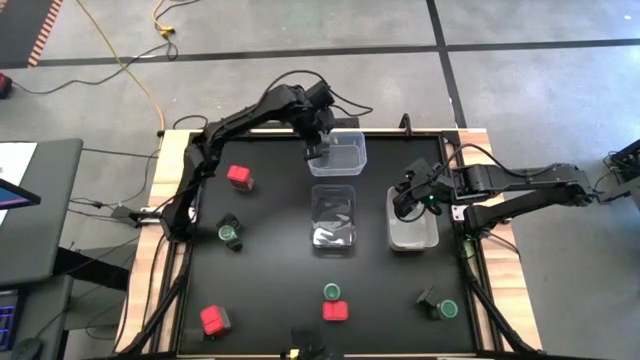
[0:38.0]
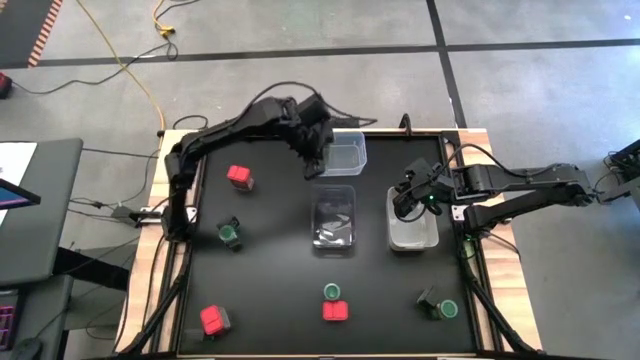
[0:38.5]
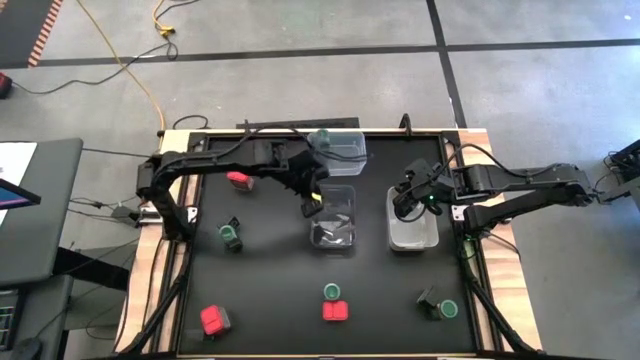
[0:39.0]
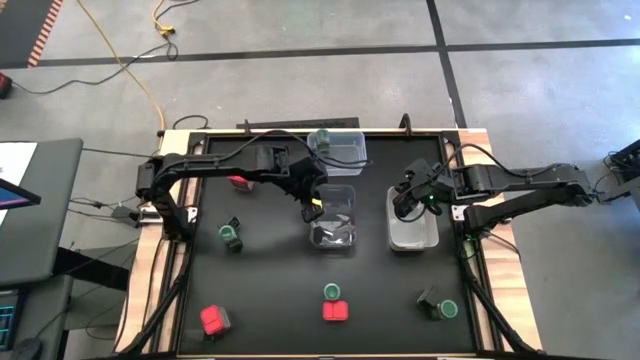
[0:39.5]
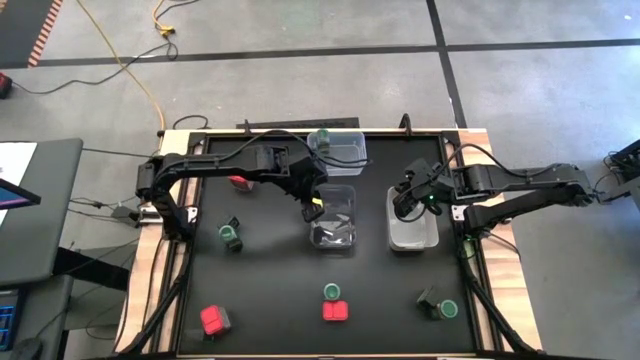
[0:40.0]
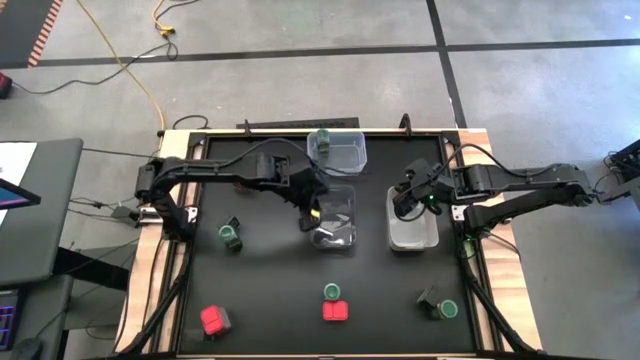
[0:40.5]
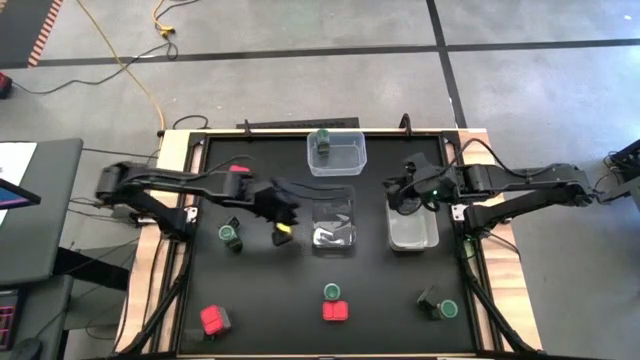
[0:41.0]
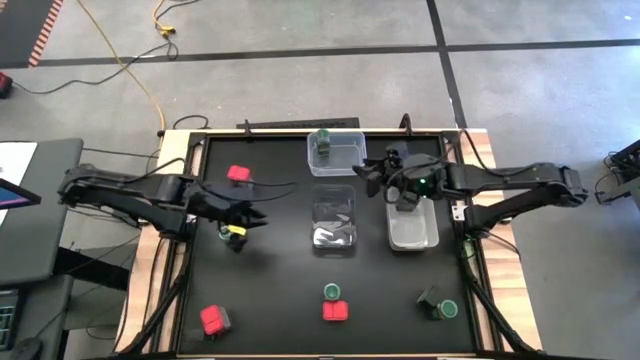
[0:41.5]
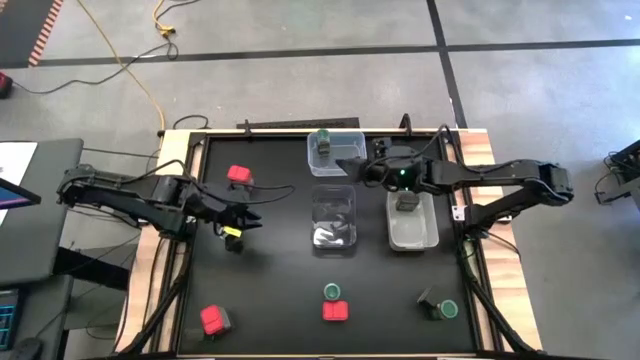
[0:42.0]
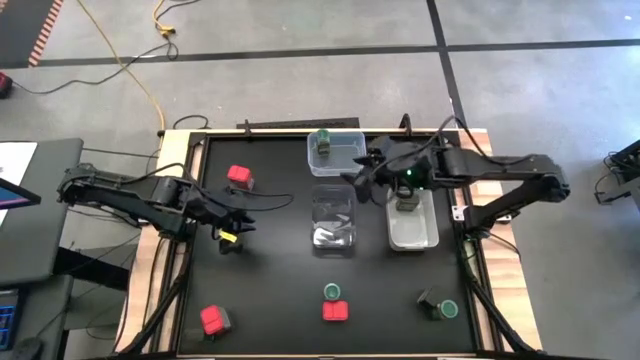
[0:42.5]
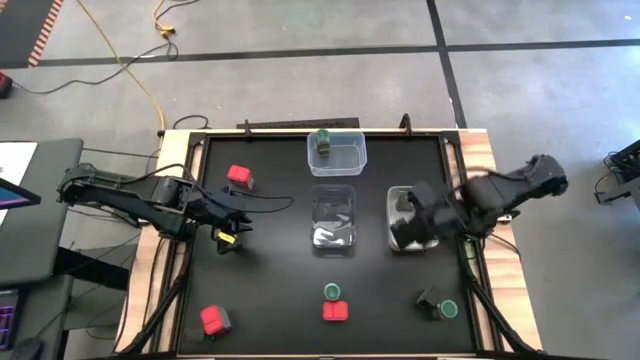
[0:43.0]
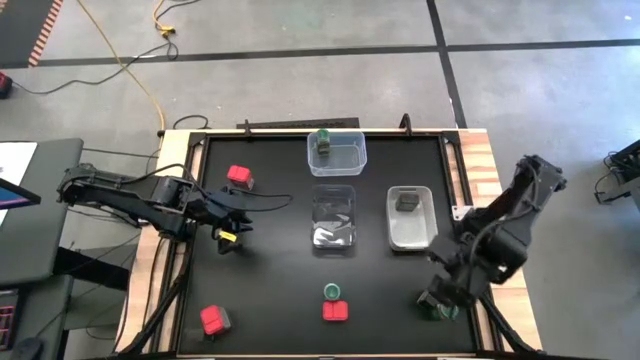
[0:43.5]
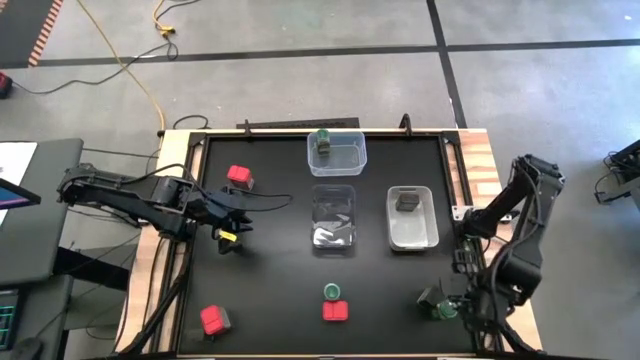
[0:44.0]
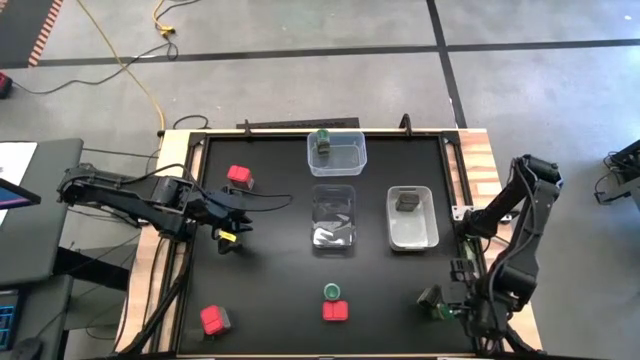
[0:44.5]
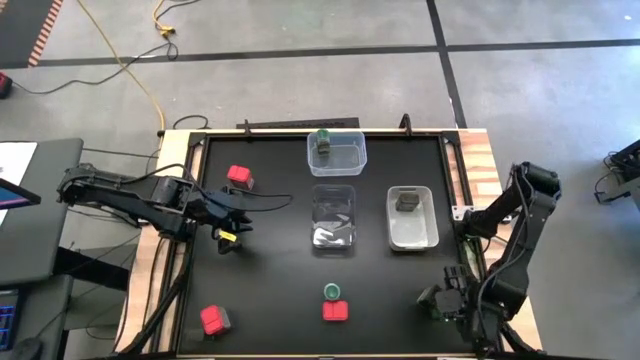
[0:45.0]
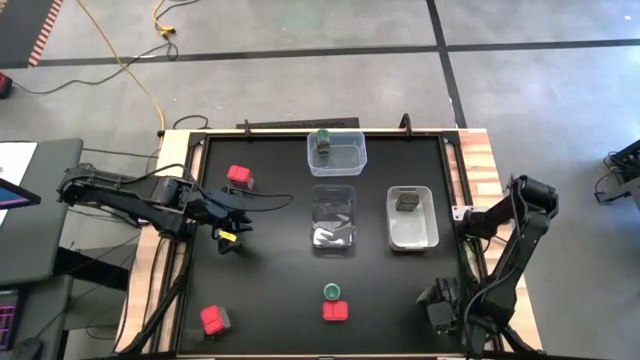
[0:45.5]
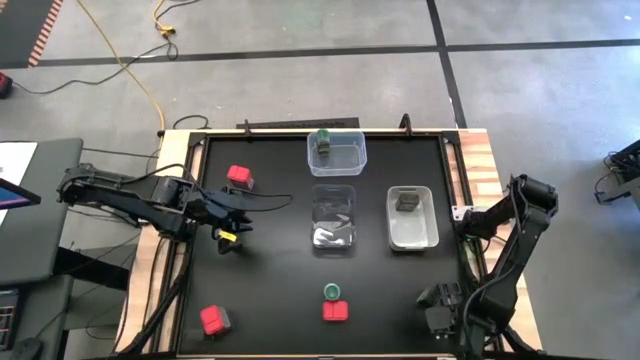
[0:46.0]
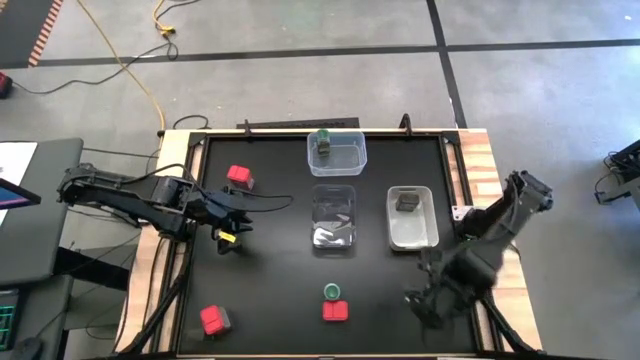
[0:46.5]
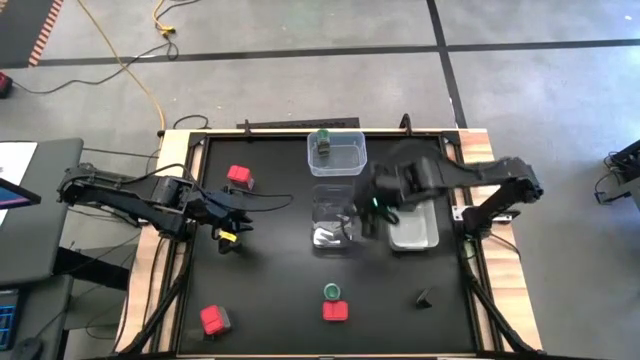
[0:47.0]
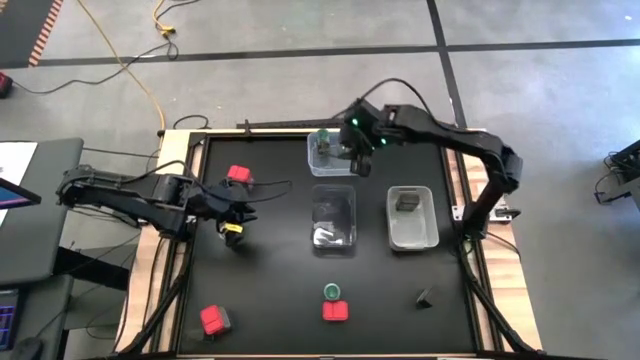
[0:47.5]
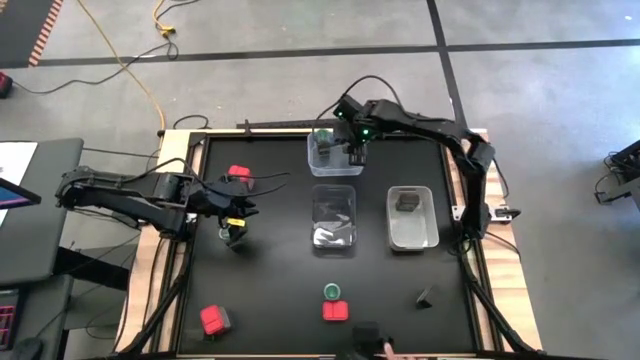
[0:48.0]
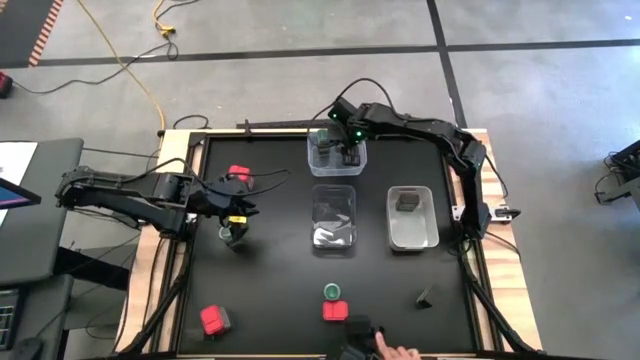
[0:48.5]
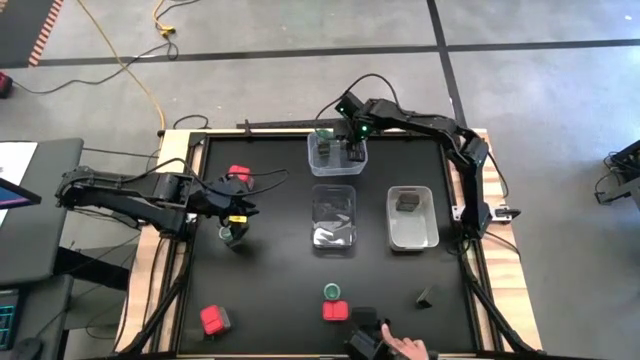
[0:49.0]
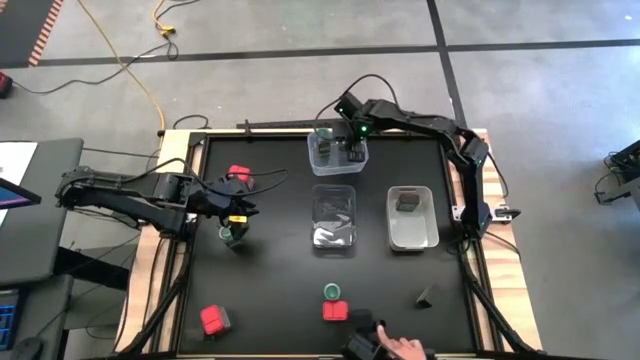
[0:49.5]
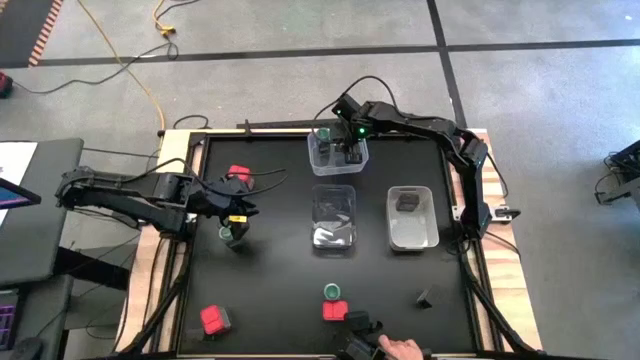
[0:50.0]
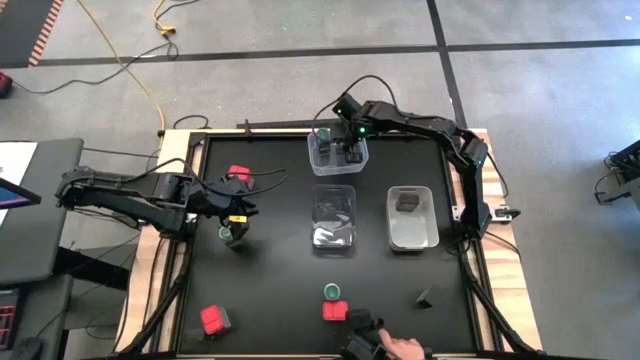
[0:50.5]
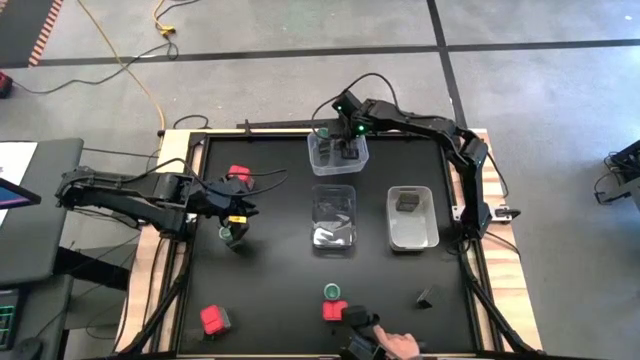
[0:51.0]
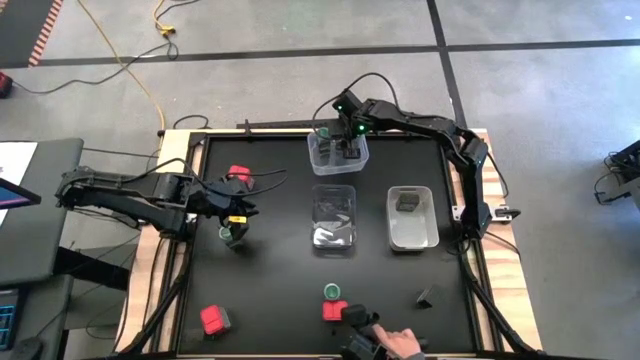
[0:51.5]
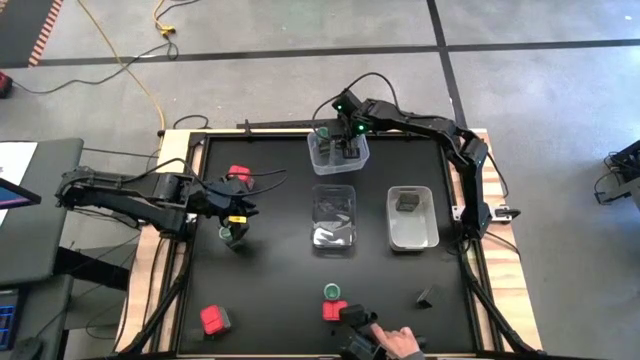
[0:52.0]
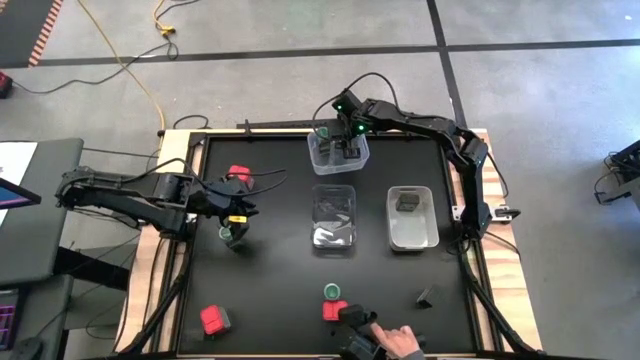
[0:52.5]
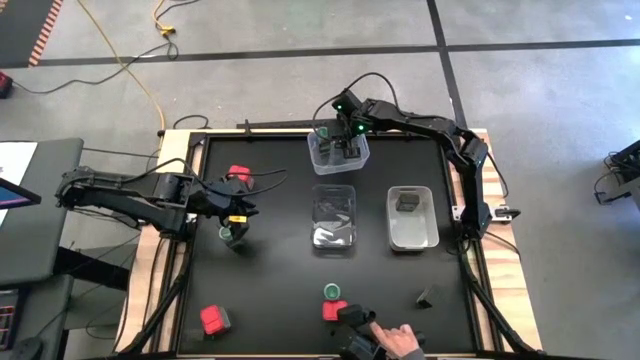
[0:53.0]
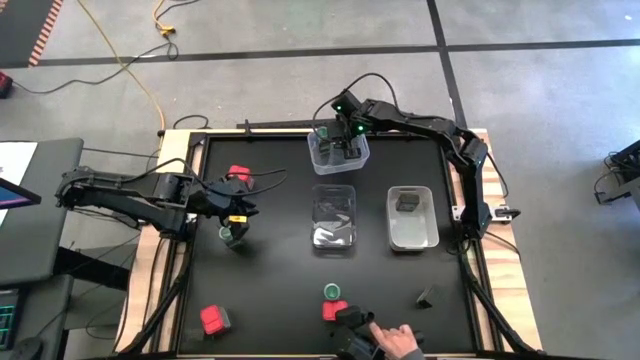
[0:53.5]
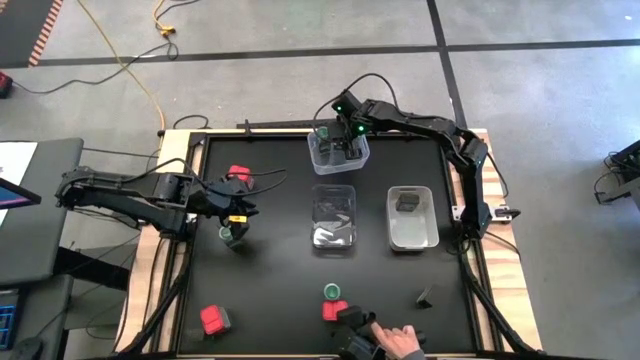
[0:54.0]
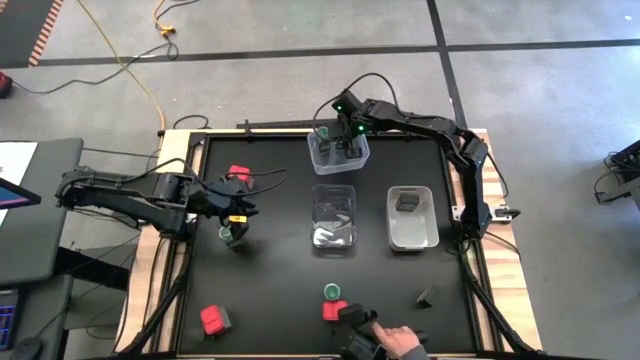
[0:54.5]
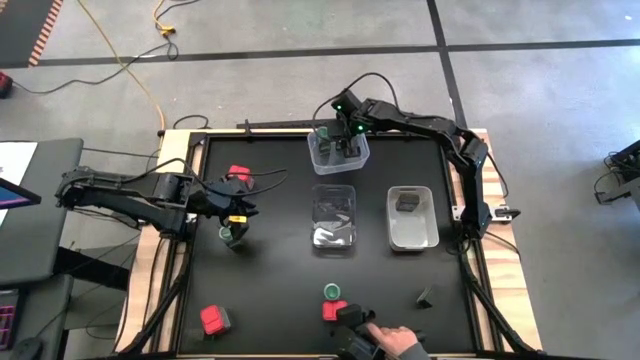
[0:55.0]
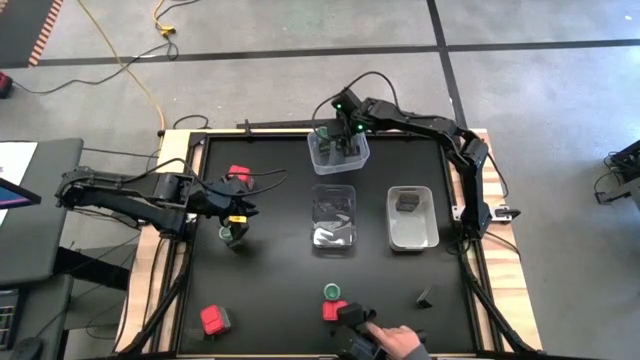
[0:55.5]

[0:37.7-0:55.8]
Task: Sort spices by type
Put the green seasoning bottle into the transparent bin

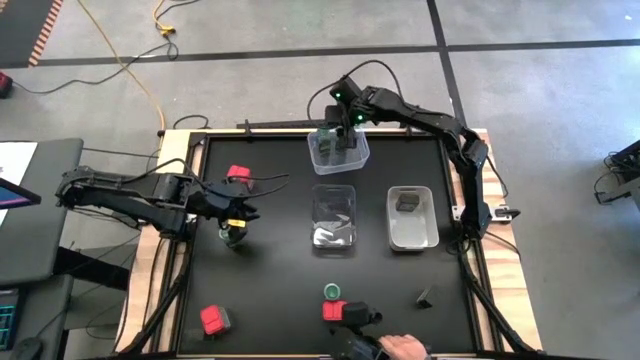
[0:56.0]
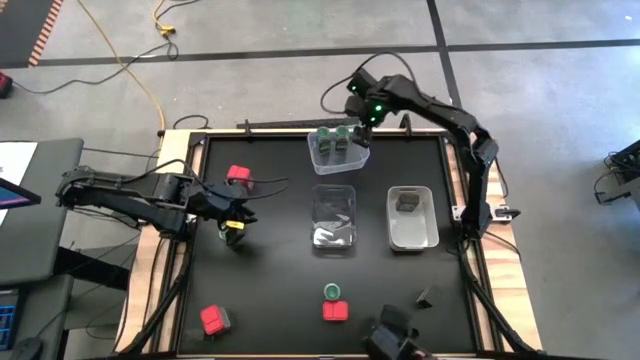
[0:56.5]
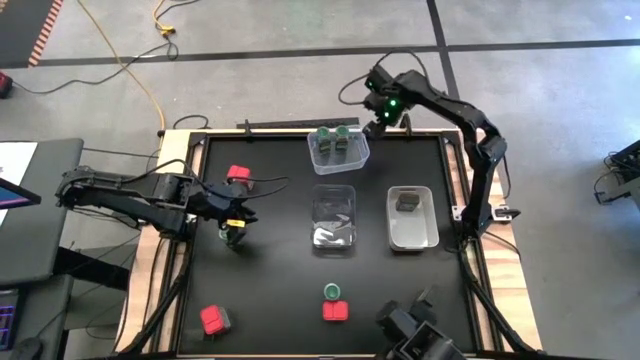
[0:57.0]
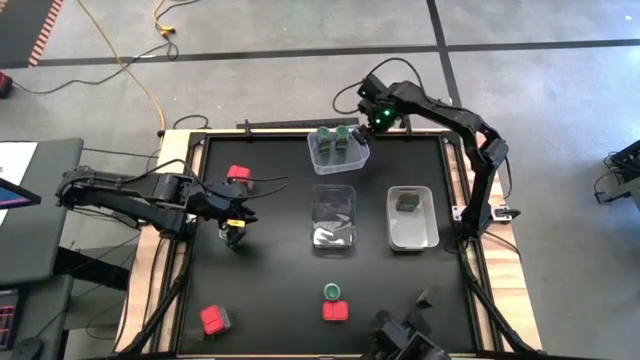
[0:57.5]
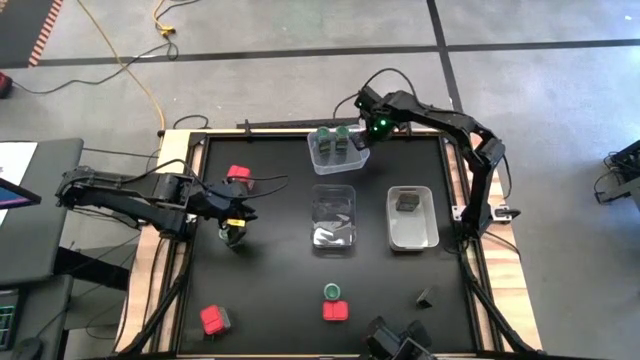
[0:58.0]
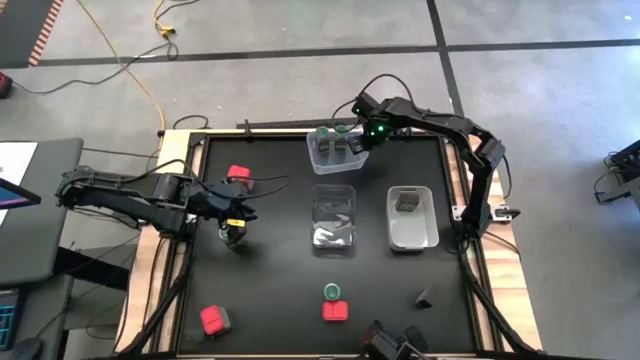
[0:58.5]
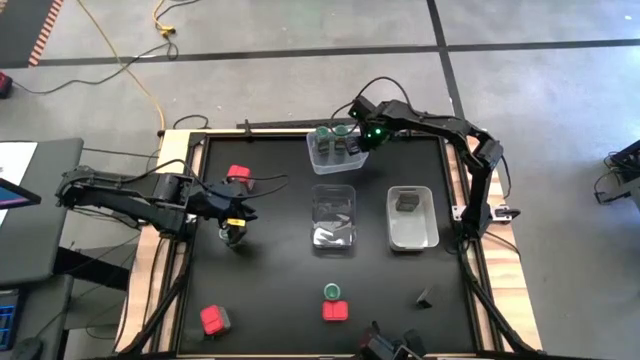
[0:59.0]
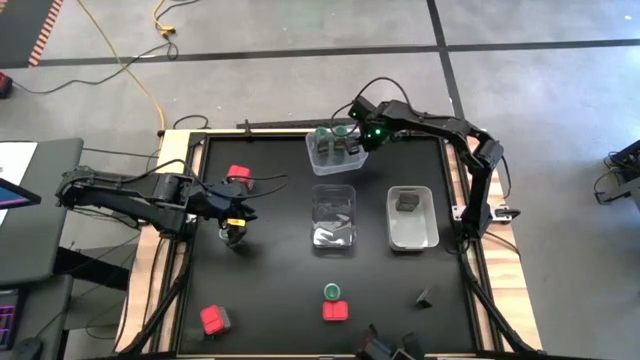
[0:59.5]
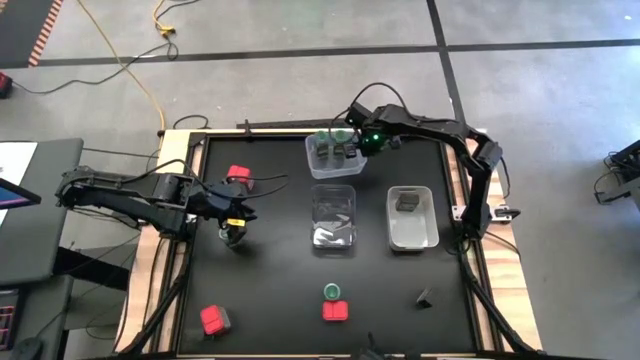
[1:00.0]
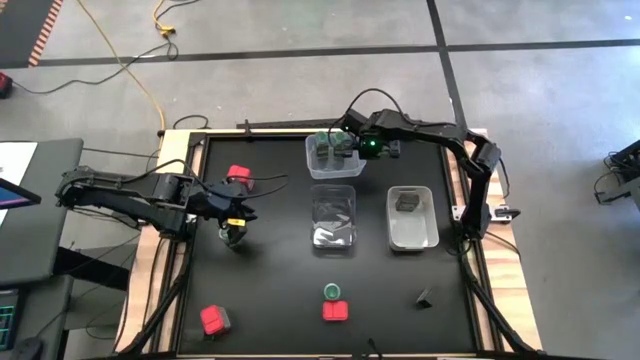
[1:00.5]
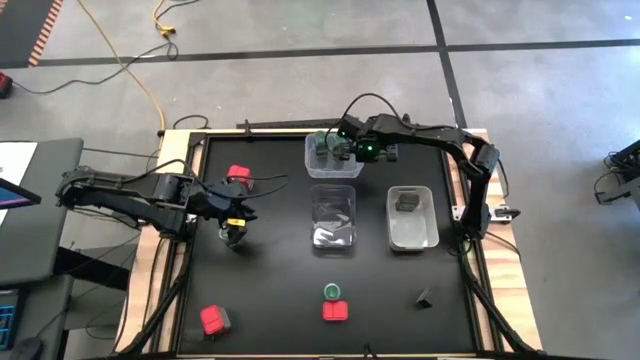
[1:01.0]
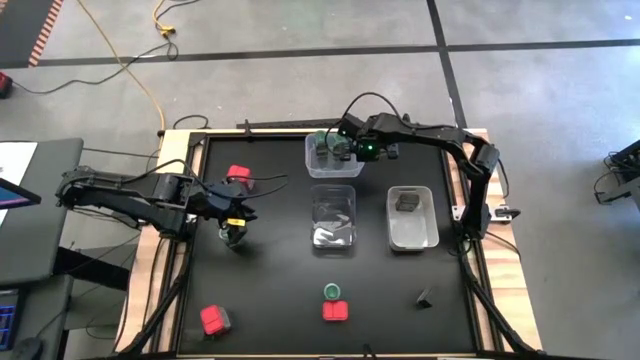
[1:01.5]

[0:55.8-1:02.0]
Adjust the transparent bin
